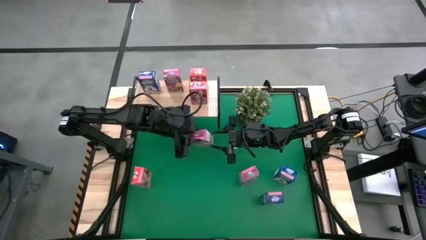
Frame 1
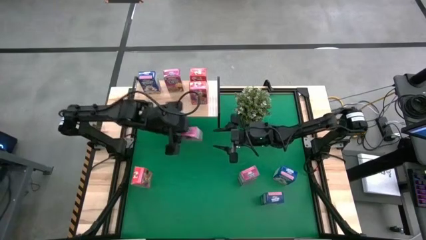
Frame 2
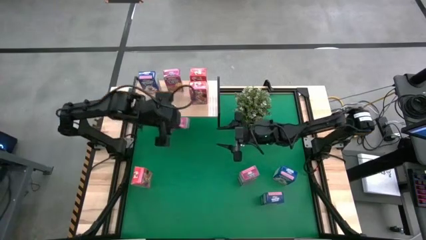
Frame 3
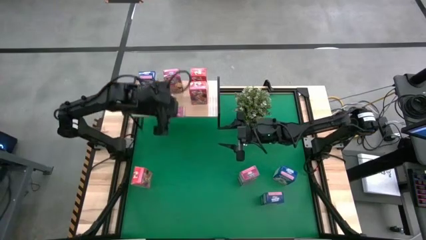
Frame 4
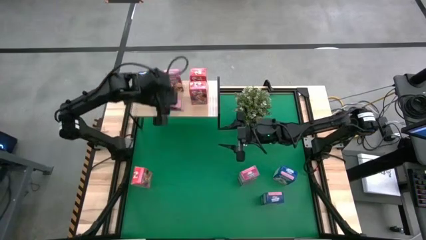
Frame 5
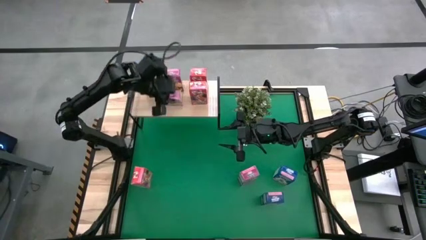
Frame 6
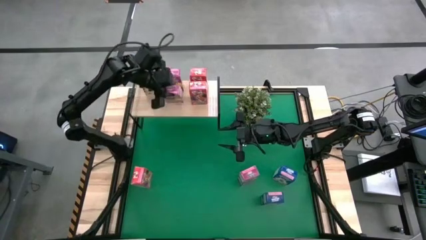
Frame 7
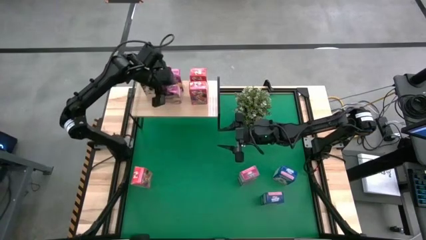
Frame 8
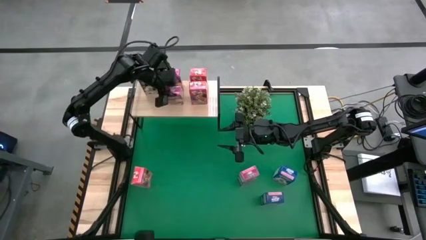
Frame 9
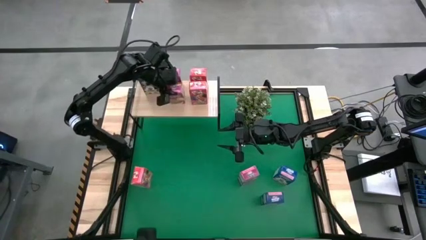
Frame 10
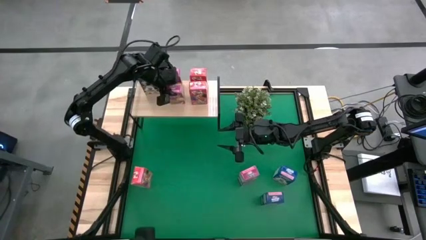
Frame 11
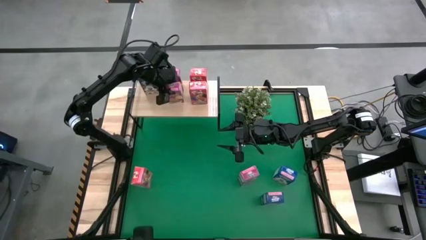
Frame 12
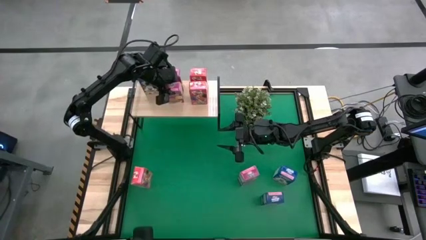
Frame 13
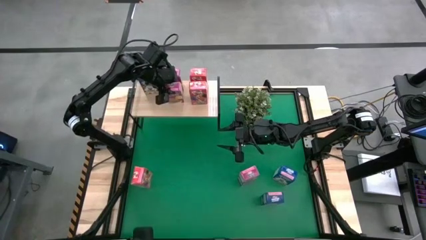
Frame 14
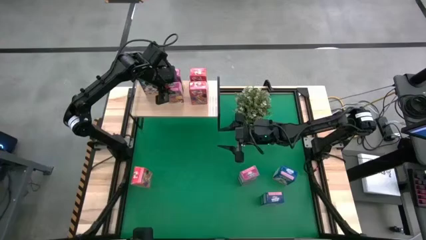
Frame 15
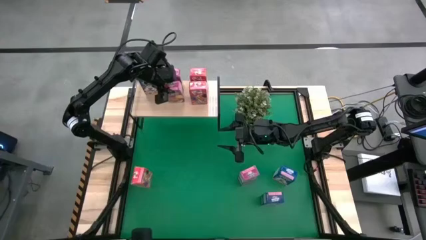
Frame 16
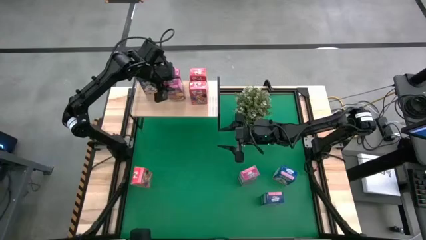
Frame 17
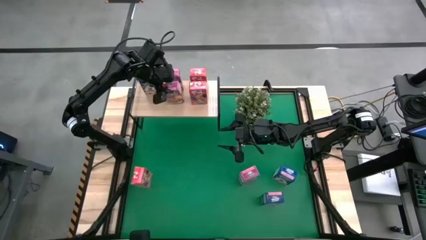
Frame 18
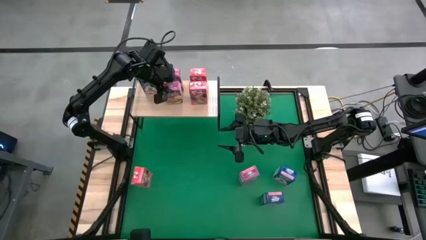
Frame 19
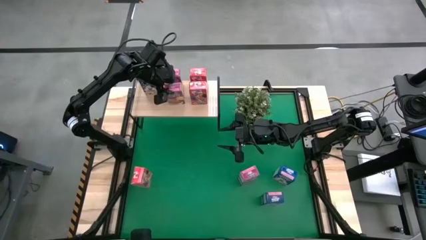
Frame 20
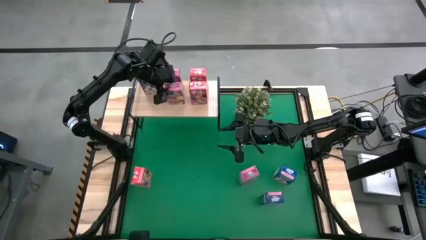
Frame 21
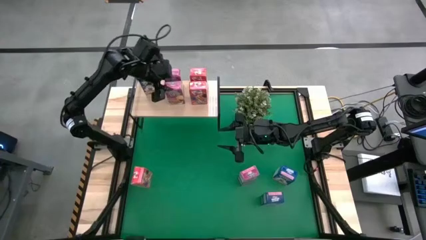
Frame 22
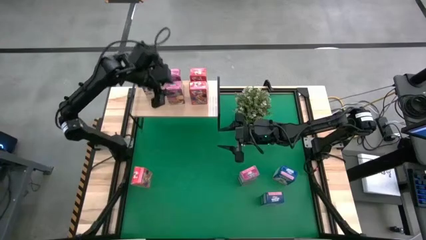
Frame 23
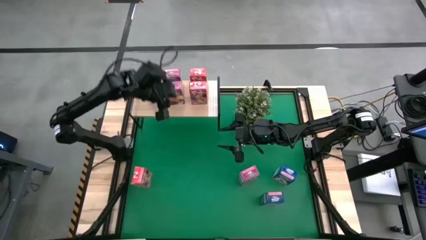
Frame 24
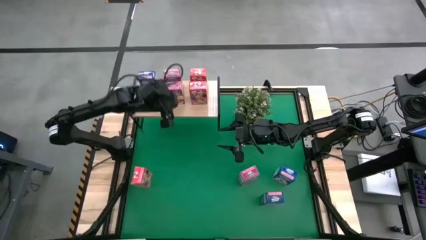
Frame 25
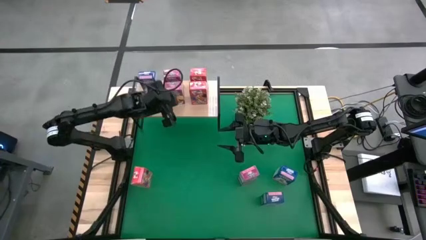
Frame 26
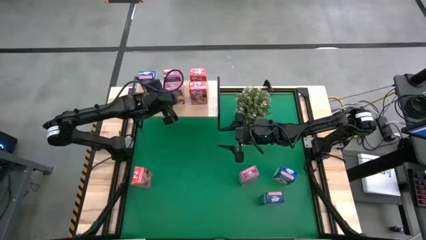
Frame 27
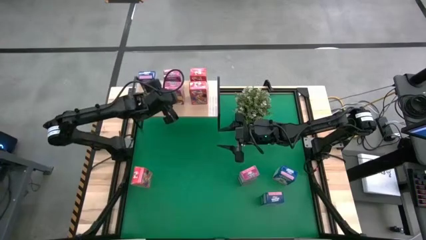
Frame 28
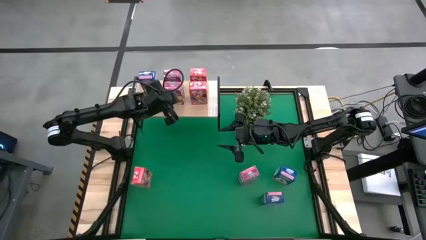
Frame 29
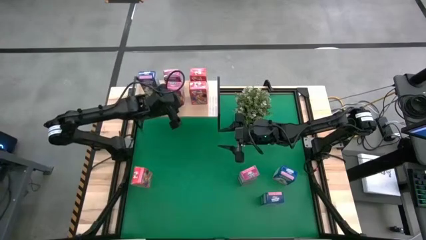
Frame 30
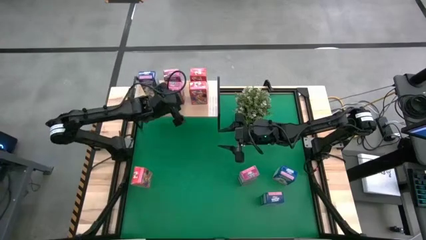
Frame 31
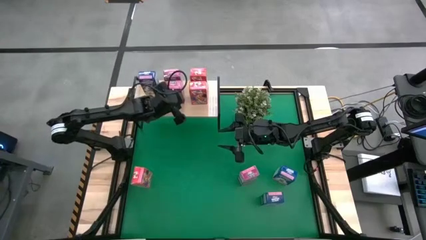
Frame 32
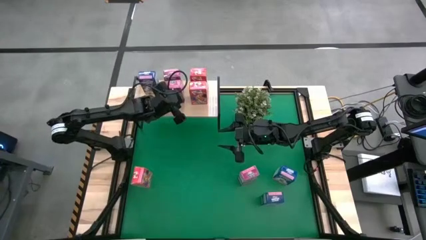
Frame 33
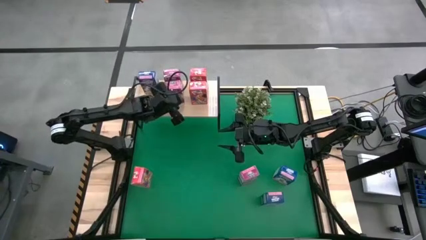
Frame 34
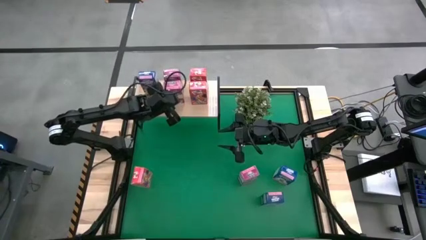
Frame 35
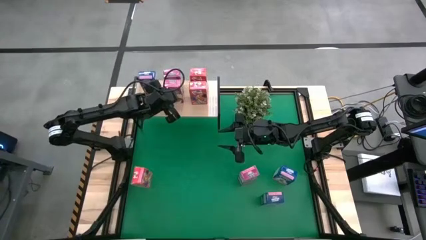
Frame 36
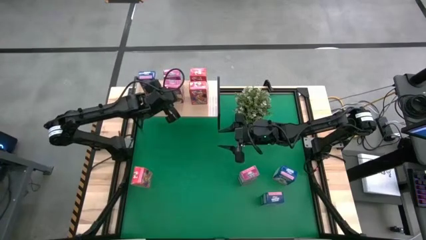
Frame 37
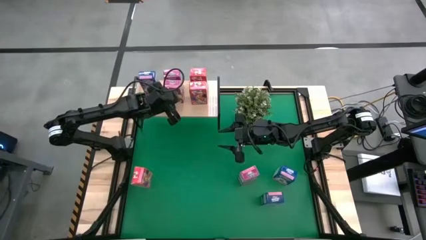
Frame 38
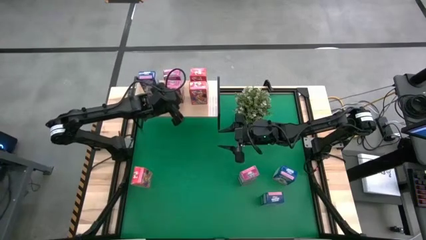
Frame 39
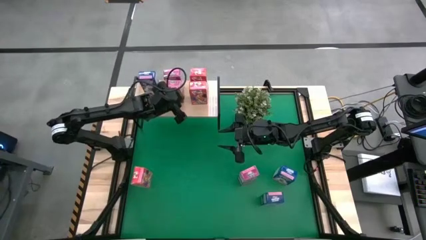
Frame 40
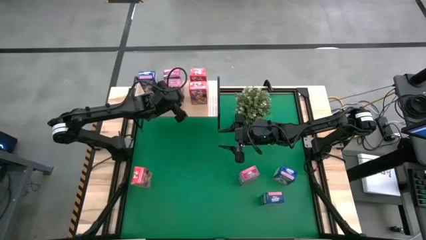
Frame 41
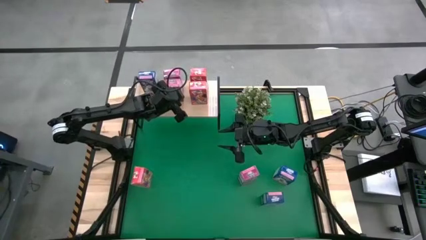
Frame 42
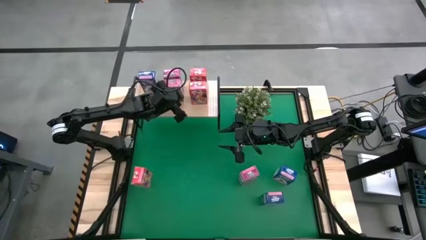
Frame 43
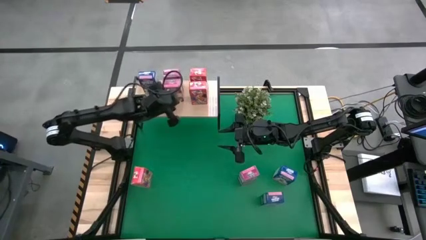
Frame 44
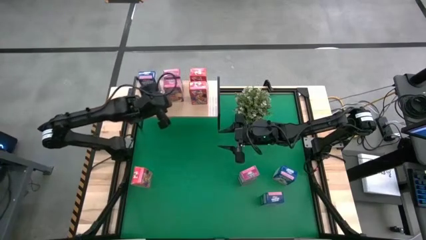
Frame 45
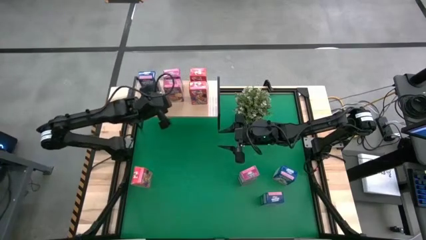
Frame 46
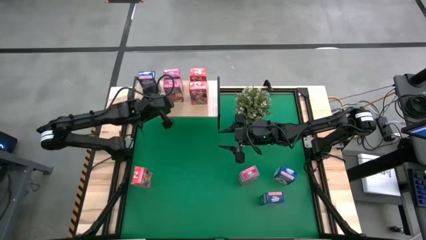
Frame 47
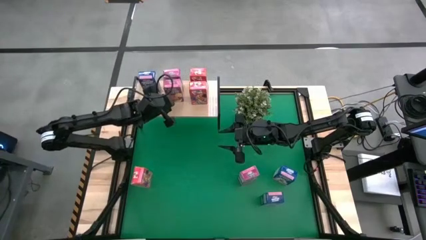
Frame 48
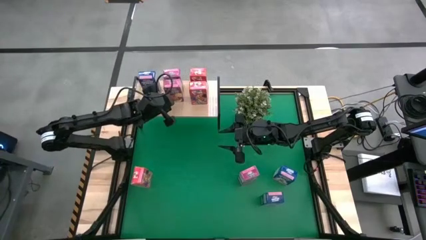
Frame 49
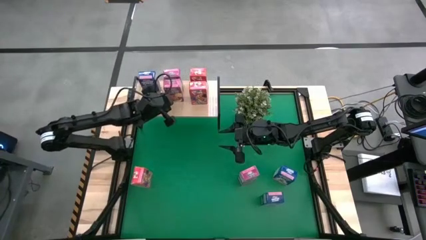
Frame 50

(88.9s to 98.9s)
Task: Stack cereal on shelf
Put the top pink cereal box on the shelf
